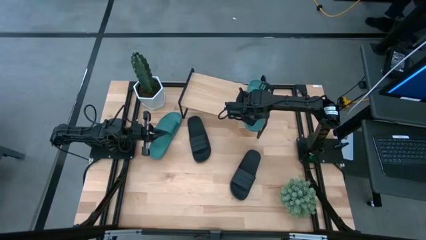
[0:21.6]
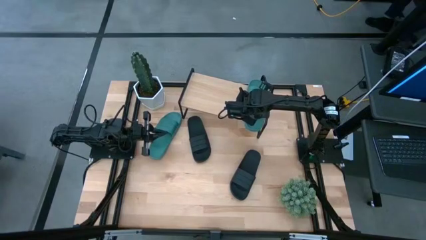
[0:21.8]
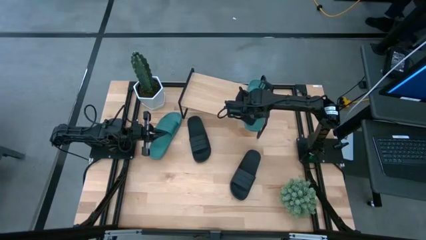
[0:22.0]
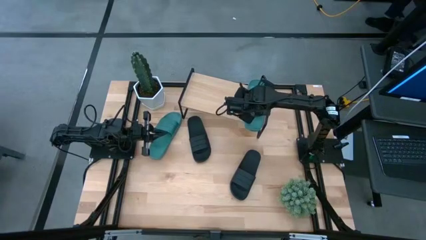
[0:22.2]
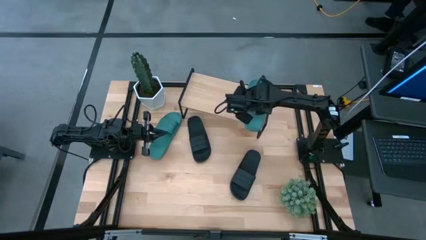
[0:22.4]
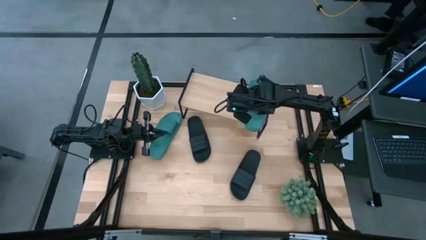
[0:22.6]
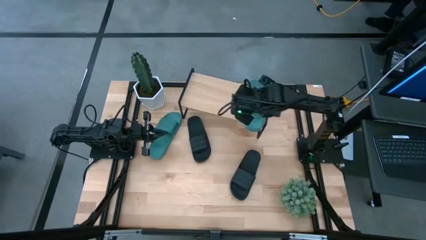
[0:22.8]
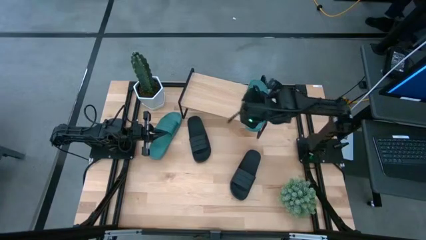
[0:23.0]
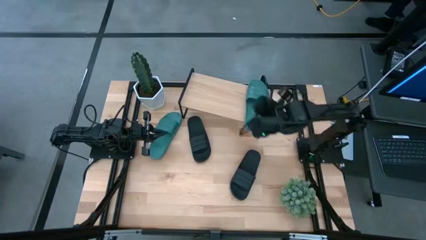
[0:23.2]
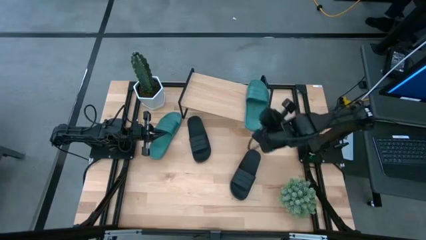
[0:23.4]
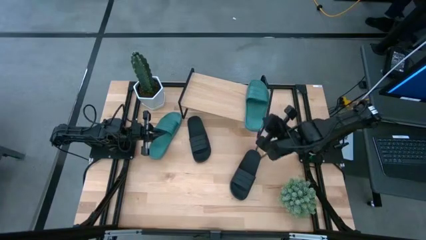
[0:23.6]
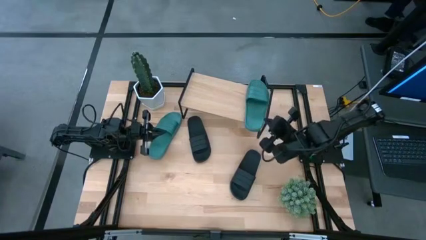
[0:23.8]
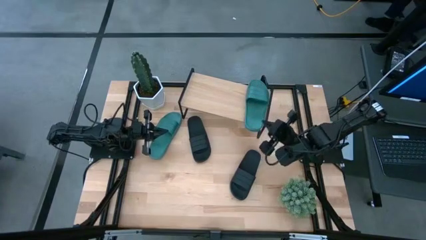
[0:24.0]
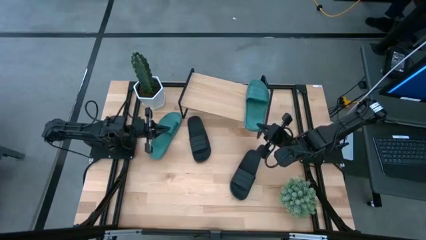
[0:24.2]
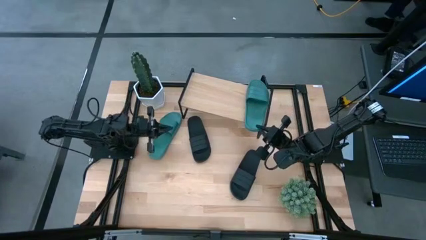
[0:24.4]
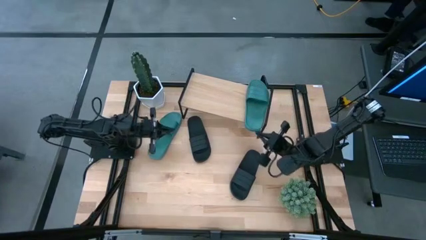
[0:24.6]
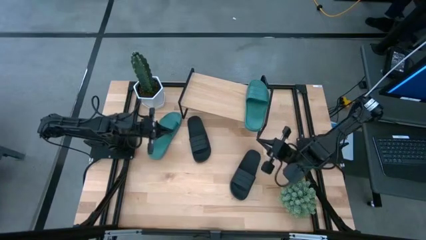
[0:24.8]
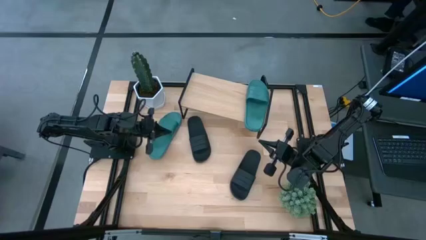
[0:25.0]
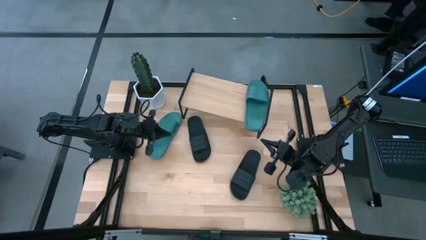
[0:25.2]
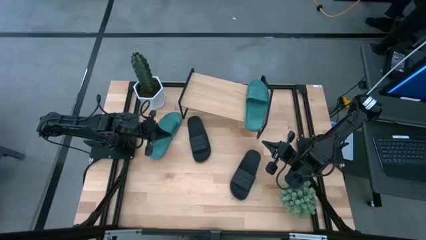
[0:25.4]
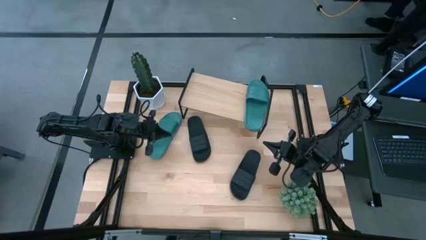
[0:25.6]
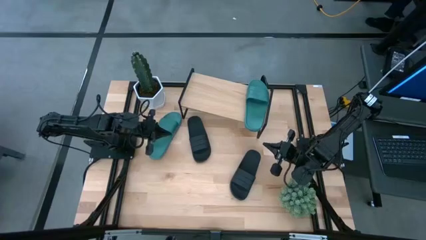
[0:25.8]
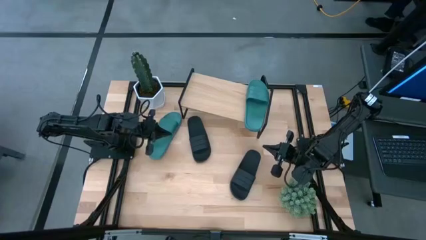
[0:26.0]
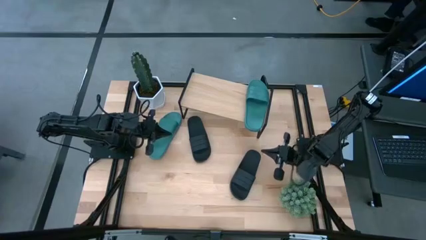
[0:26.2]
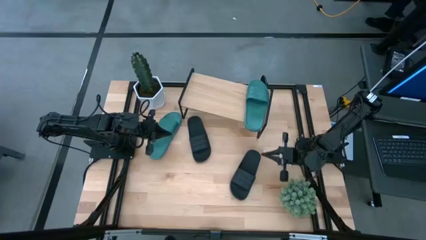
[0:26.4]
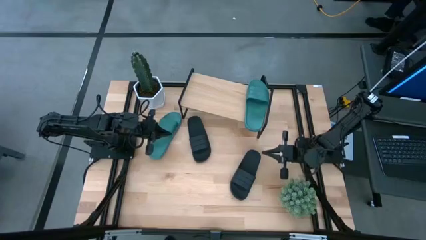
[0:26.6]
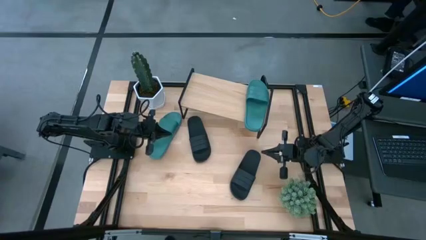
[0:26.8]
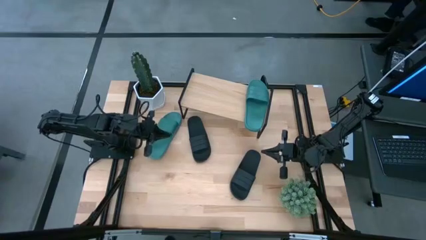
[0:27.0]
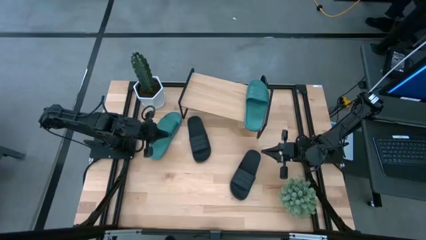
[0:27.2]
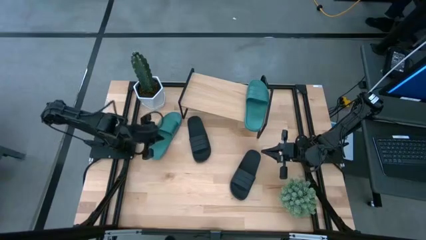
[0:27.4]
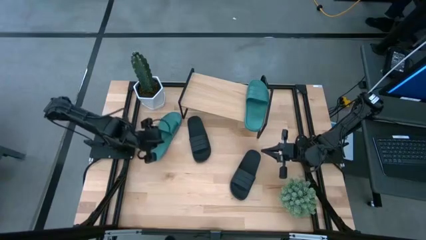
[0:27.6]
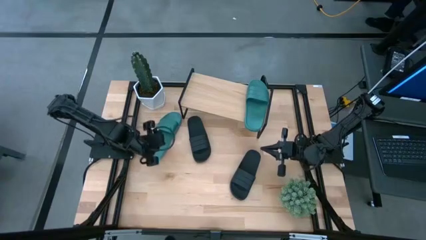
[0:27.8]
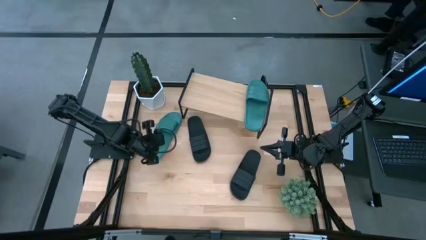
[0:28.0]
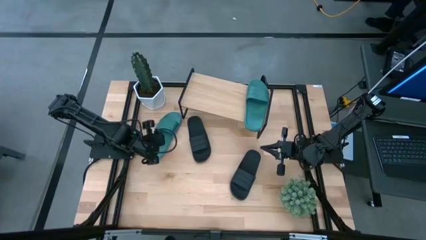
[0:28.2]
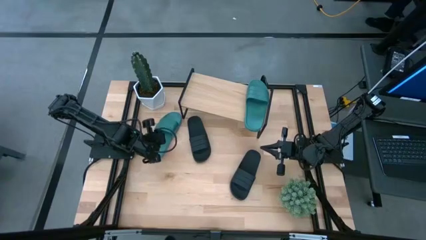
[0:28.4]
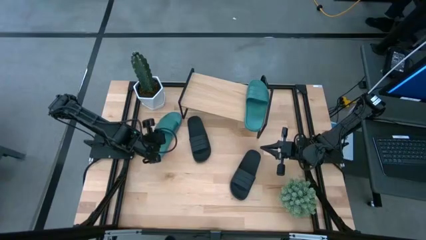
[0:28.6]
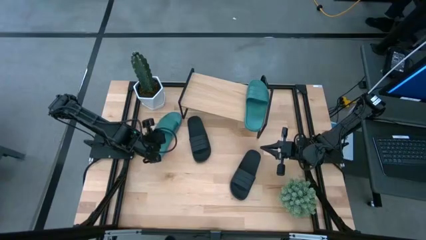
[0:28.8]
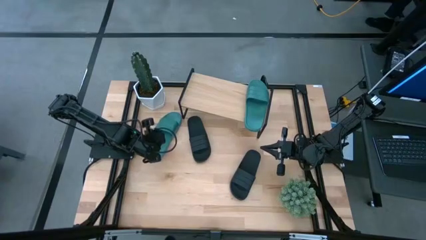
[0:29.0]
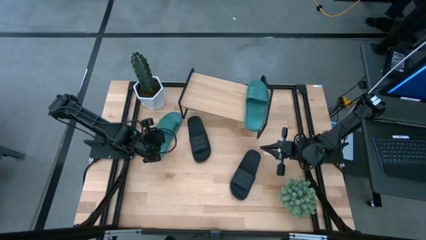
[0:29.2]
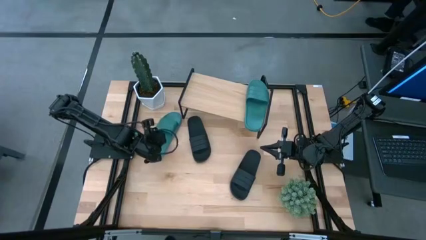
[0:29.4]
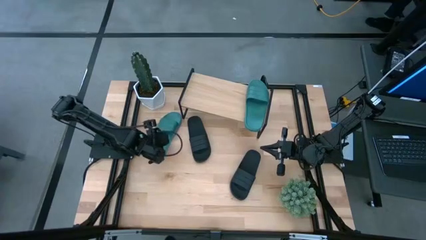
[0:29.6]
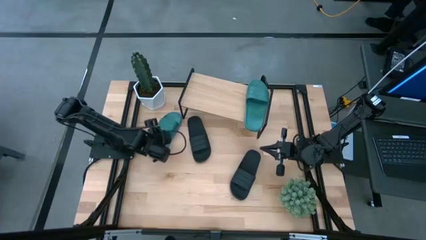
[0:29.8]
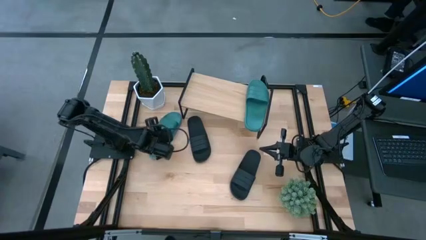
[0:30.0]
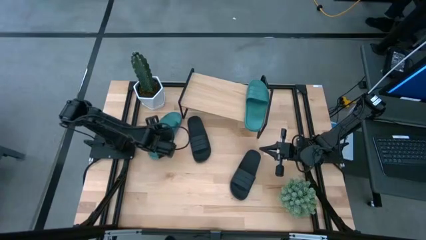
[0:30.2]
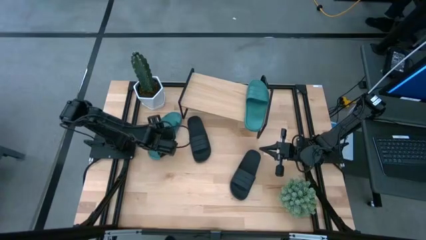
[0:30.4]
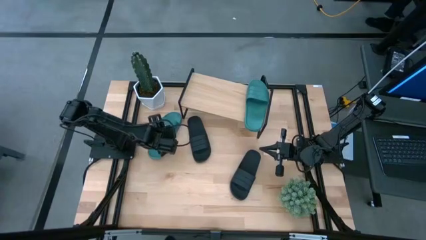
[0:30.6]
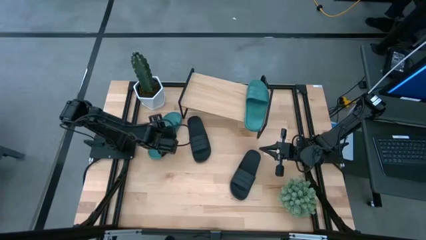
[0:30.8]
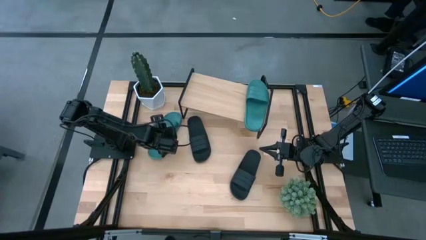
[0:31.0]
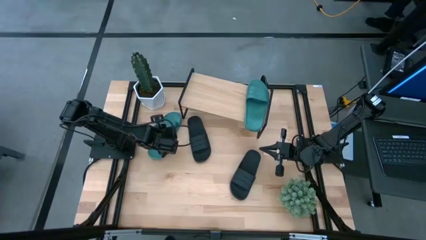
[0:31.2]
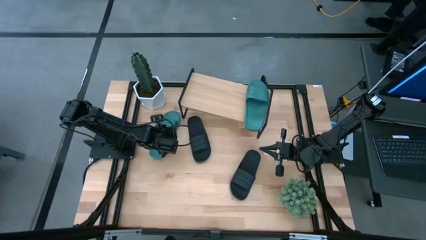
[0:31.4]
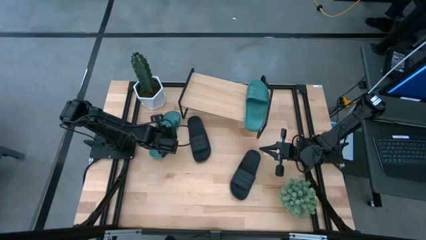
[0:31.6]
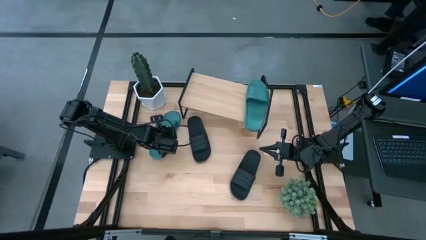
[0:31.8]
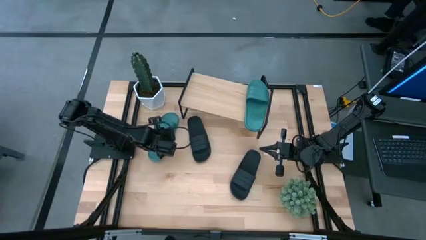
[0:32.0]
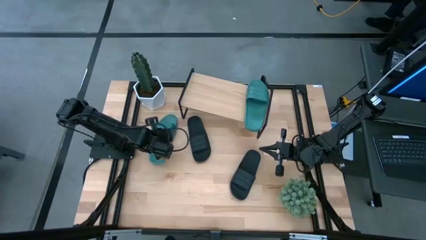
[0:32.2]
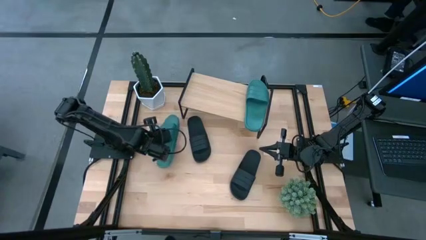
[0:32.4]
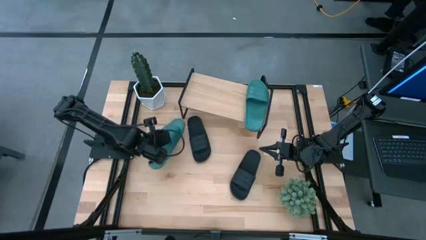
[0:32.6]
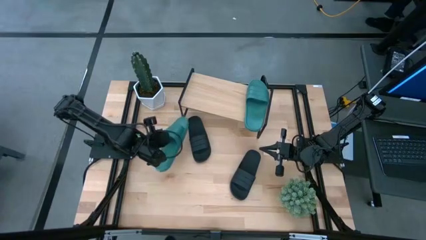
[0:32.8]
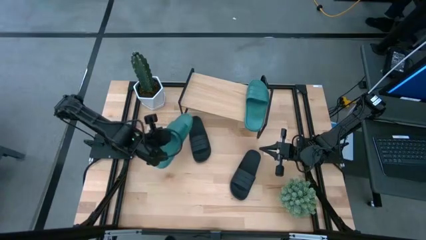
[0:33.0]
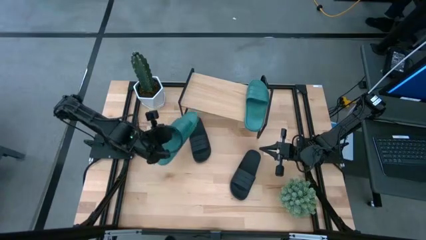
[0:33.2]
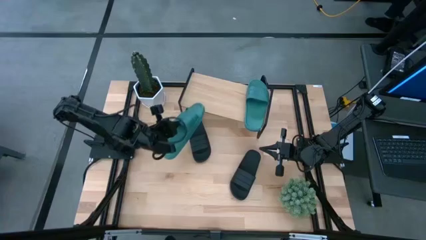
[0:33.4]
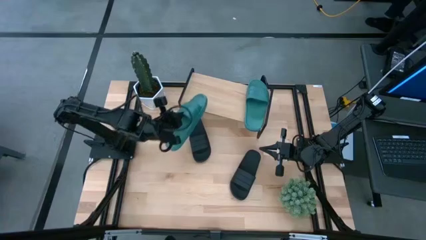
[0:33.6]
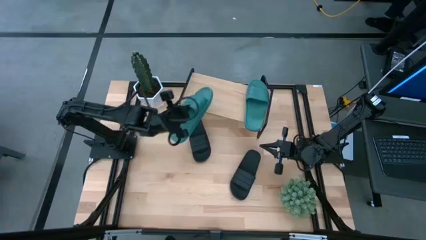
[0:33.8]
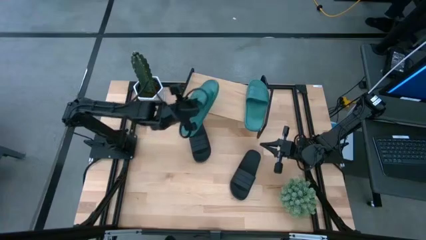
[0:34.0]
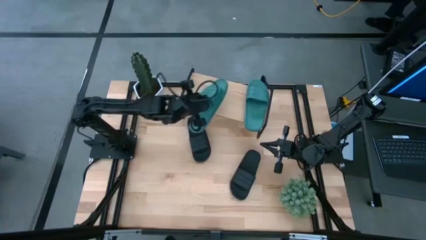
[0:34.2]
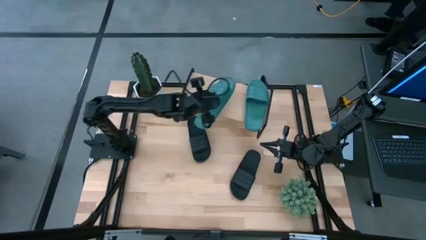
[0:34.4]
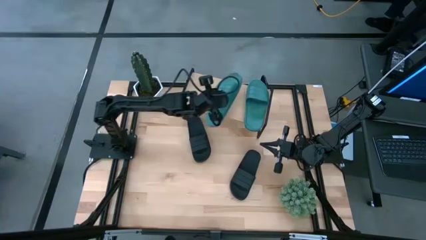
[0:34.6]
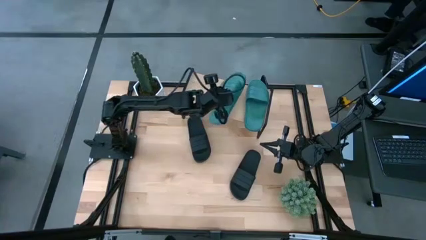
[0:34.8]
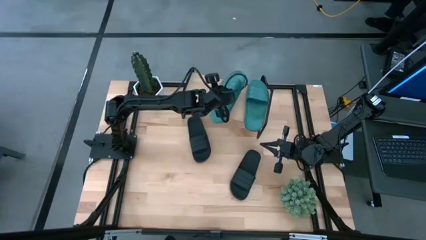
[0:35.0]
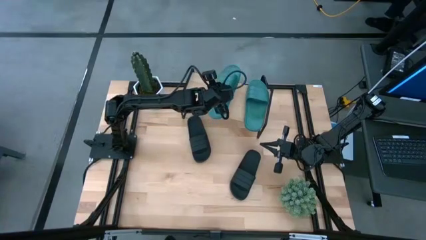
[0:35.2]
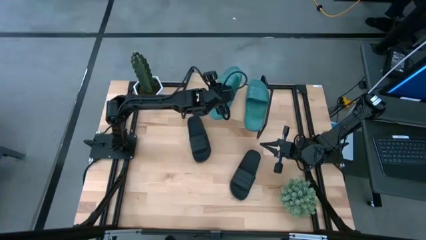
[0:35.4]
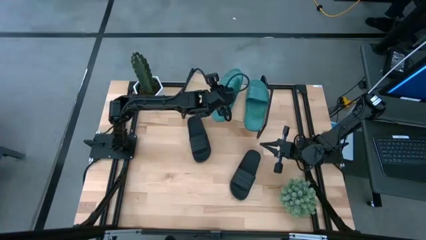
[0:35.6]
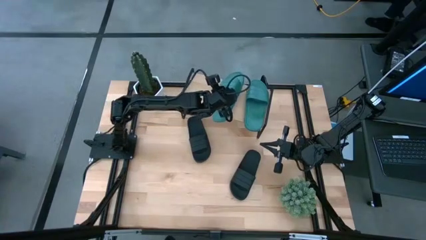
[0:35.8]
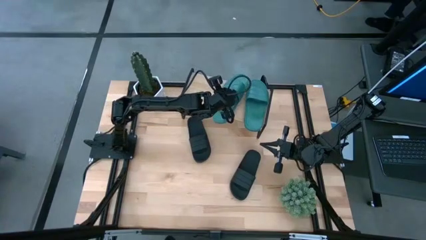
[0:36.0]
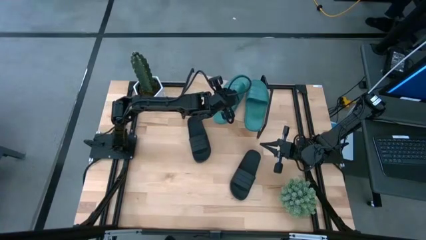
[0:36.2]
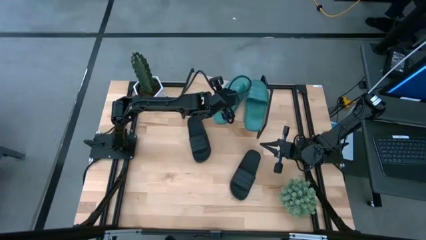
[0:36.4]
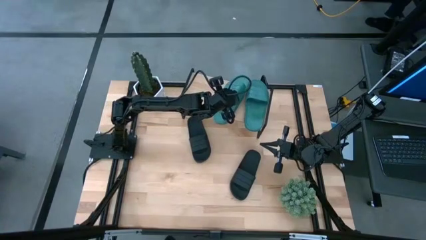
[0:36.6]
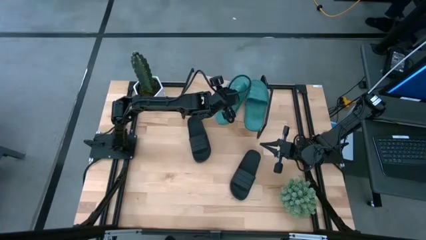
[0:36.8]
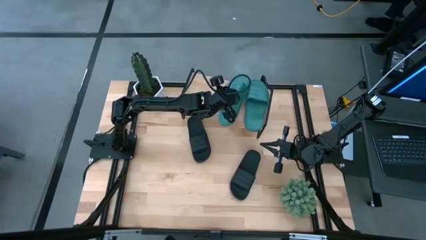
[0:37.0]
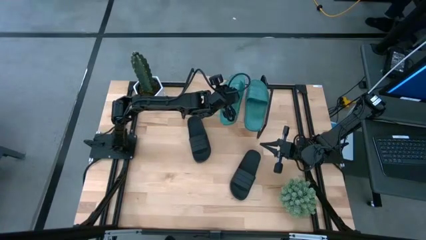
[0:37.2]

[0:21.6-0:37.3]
Task: Pick and place slides into the shelf
Put the green slide on the shelf

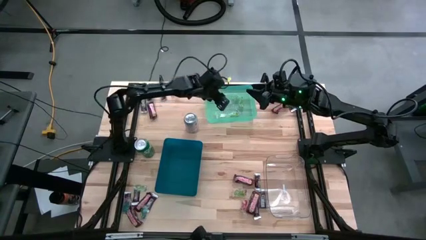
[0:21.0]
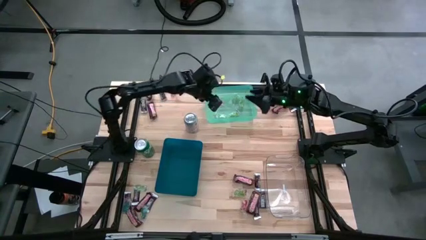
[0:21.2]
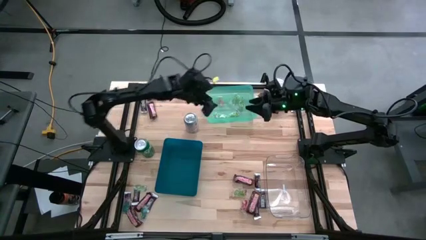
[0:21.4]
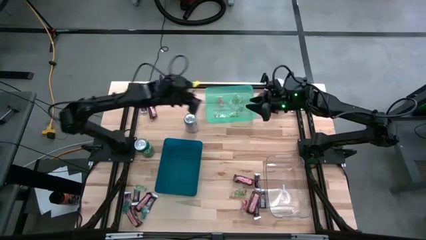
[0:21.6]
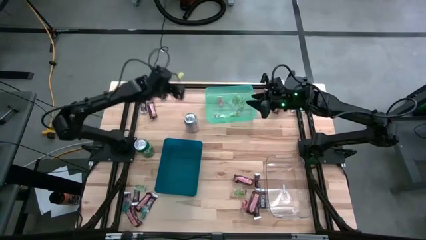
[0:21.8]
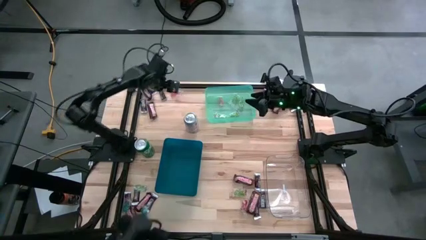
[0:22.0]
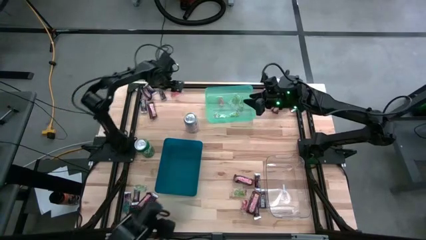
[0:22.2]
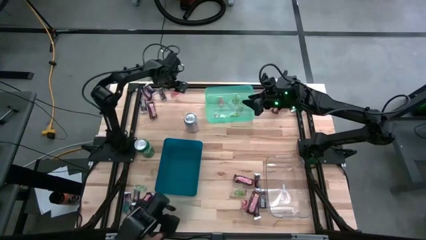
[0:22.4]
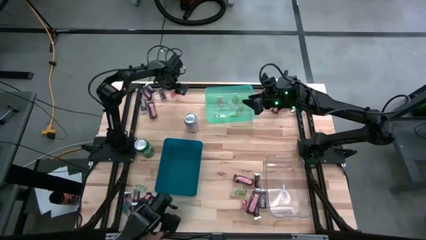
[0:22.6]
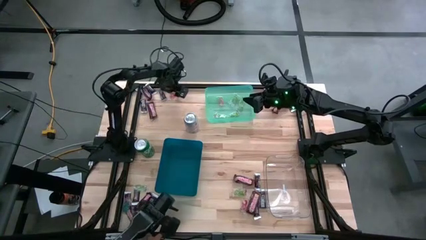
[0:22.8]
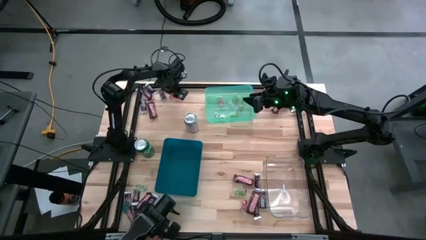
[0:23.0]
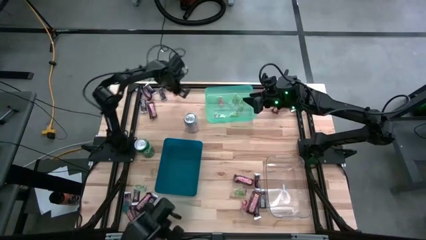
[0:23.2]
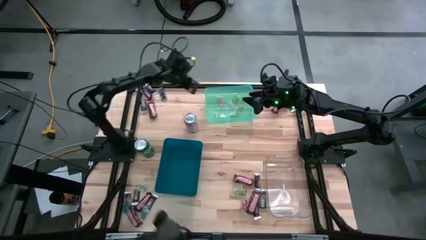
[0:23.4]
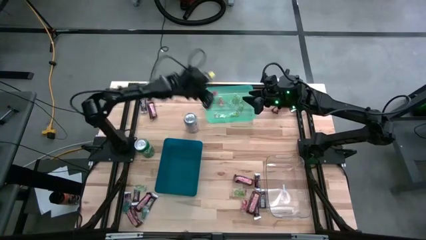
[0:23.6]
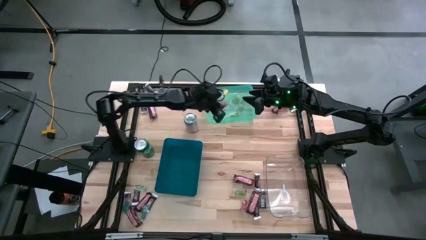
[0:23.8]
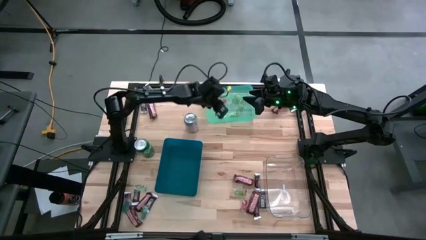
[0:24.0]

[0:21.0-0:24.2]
Task: Organize candy in baskets
Put the transparent gummy into the green bin
